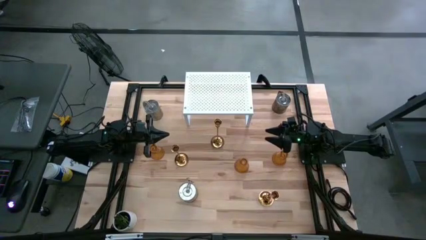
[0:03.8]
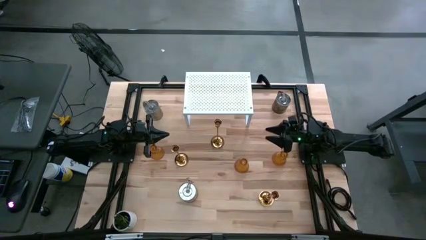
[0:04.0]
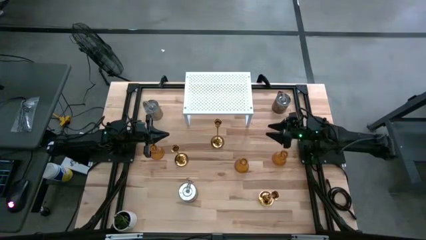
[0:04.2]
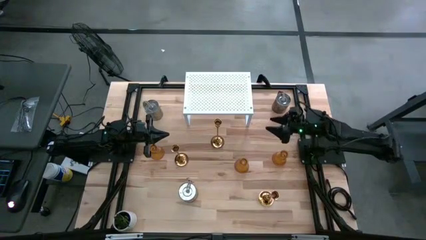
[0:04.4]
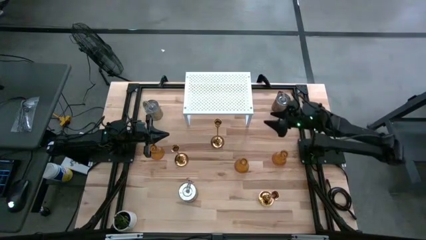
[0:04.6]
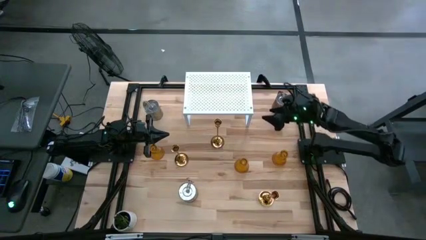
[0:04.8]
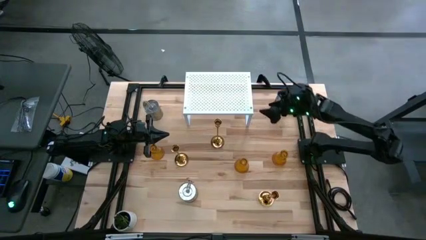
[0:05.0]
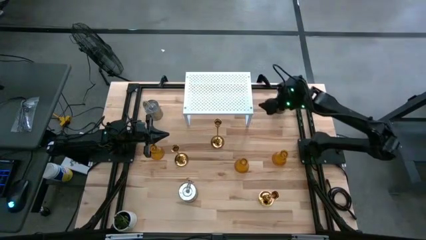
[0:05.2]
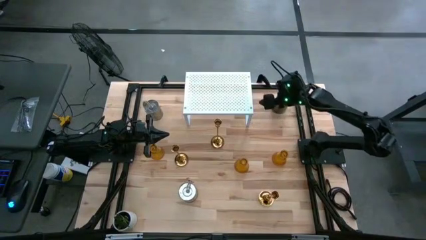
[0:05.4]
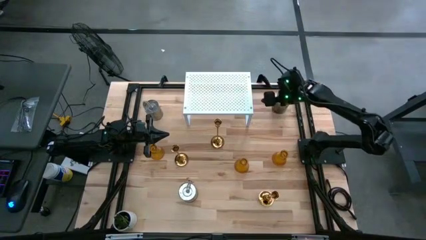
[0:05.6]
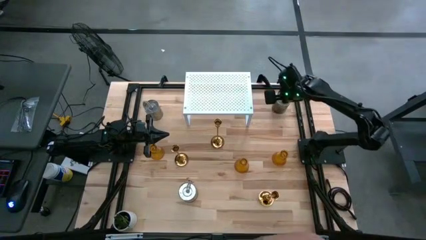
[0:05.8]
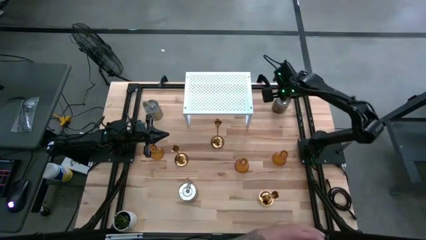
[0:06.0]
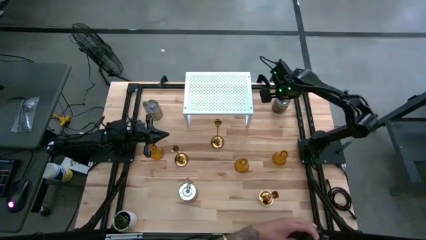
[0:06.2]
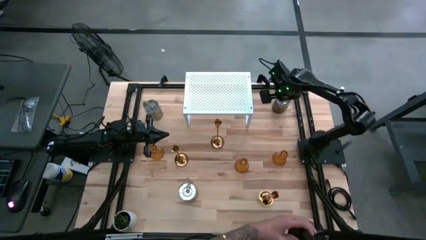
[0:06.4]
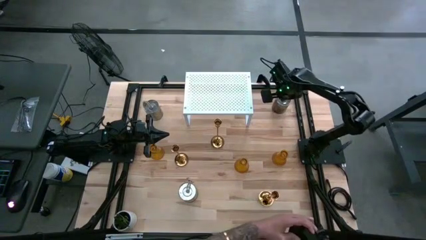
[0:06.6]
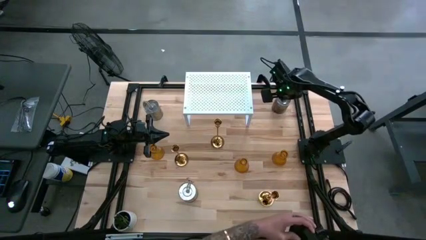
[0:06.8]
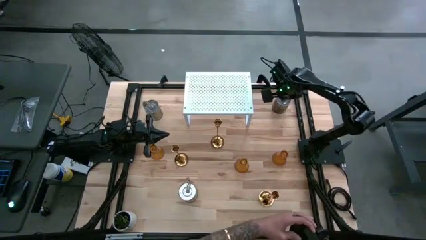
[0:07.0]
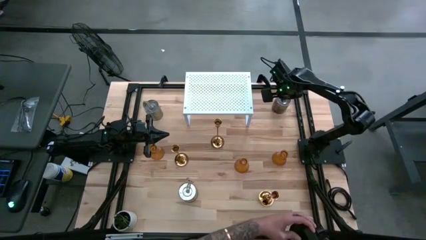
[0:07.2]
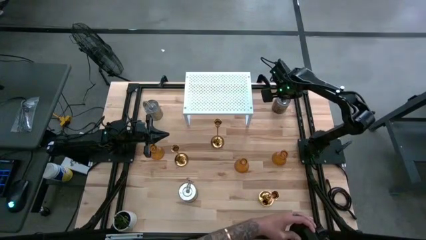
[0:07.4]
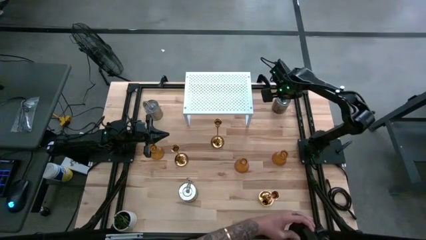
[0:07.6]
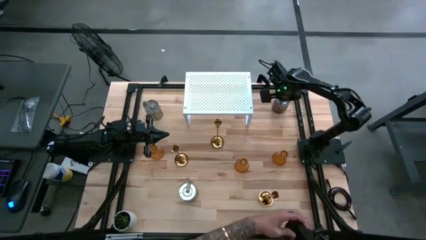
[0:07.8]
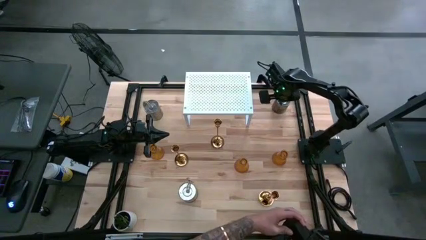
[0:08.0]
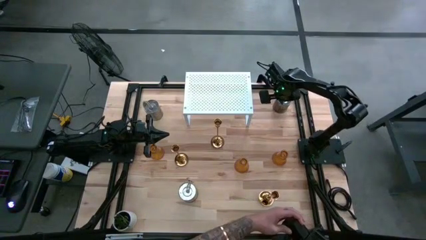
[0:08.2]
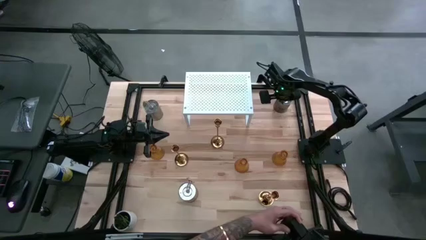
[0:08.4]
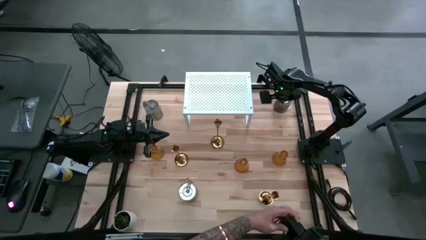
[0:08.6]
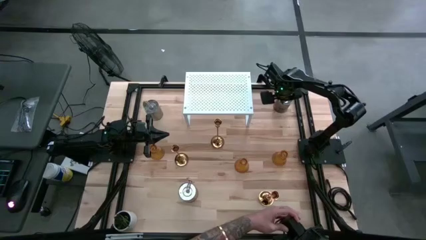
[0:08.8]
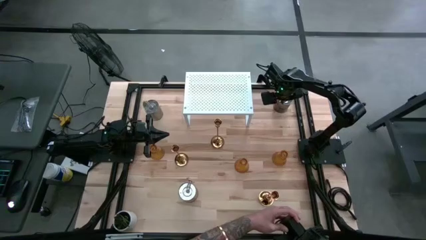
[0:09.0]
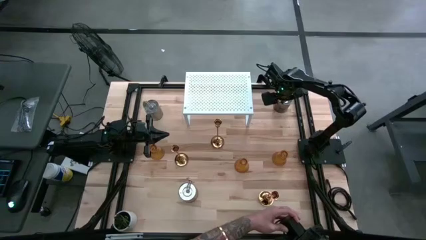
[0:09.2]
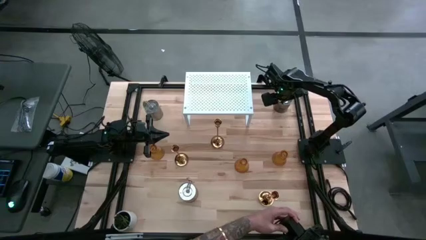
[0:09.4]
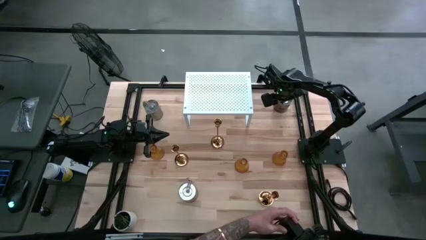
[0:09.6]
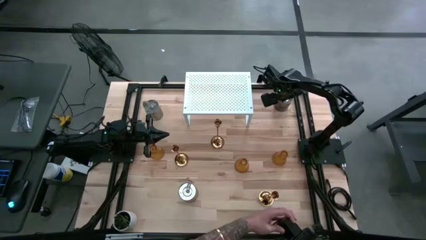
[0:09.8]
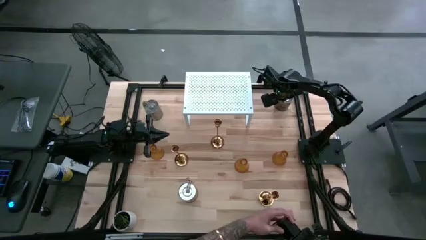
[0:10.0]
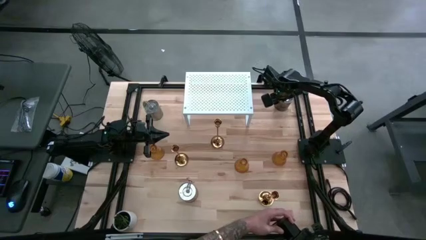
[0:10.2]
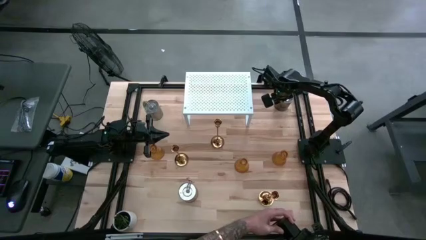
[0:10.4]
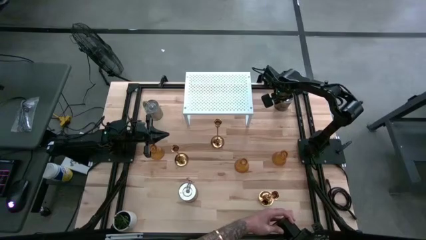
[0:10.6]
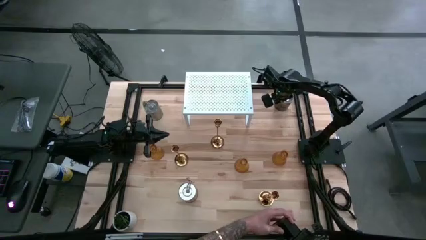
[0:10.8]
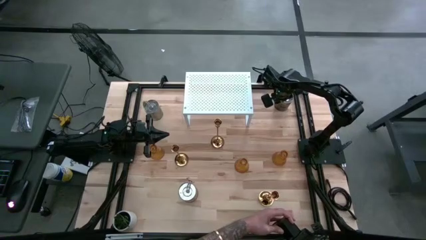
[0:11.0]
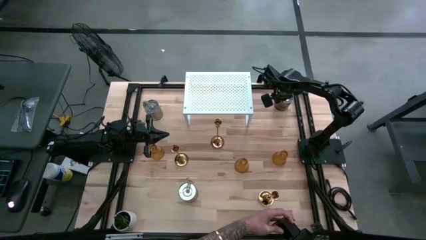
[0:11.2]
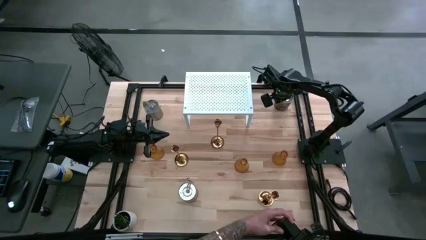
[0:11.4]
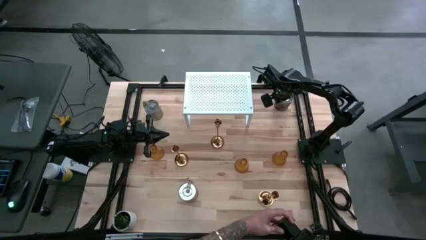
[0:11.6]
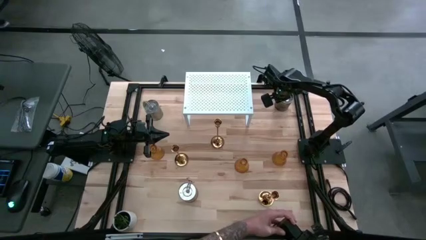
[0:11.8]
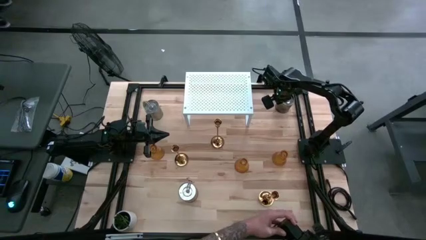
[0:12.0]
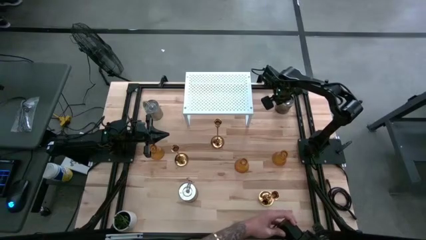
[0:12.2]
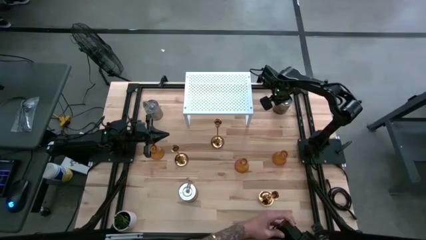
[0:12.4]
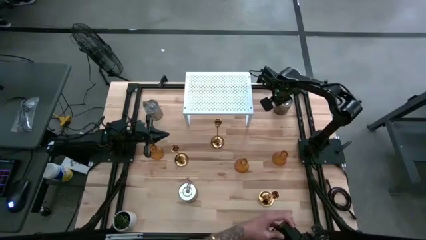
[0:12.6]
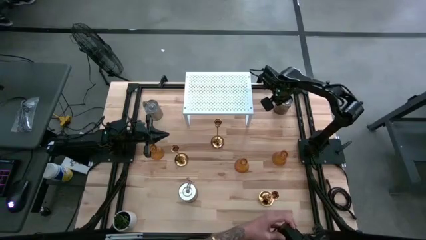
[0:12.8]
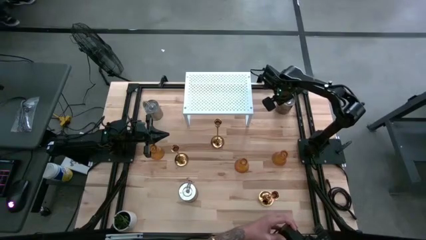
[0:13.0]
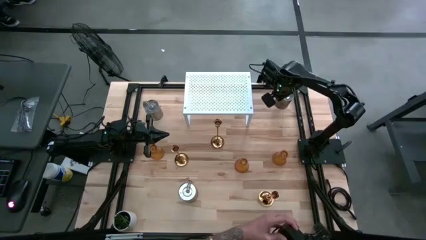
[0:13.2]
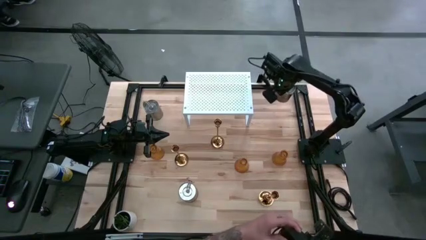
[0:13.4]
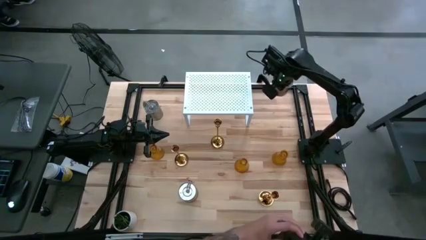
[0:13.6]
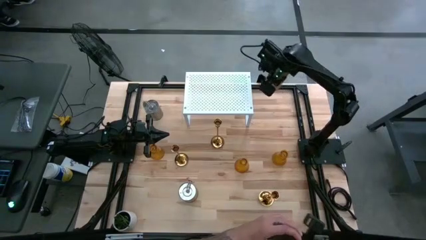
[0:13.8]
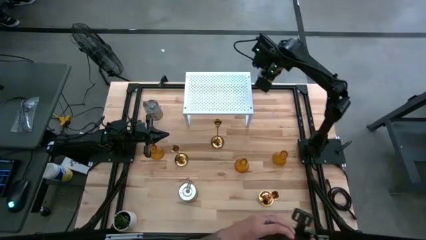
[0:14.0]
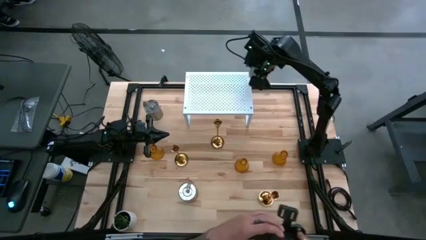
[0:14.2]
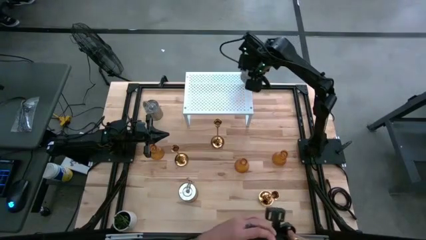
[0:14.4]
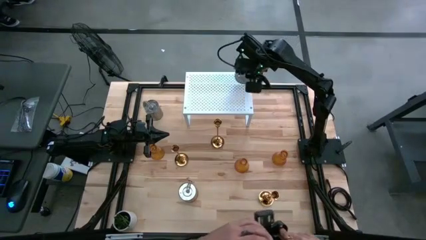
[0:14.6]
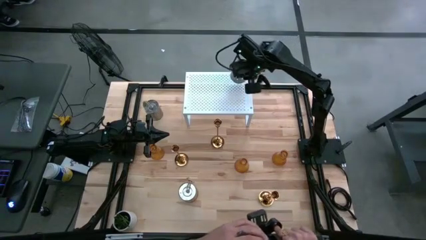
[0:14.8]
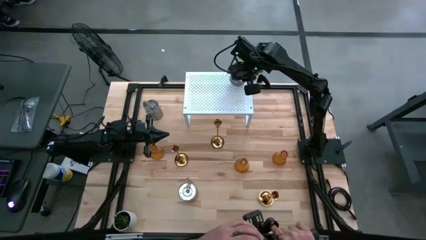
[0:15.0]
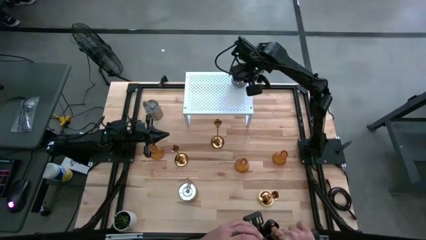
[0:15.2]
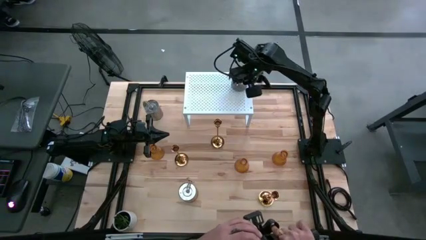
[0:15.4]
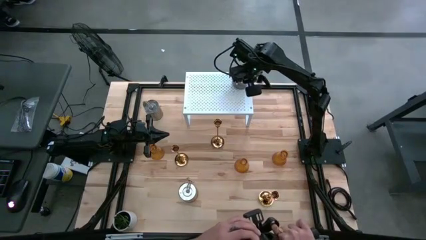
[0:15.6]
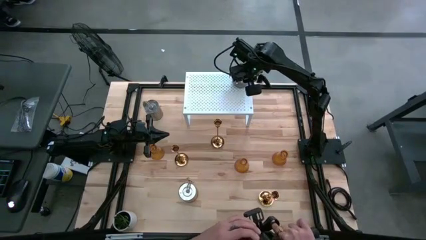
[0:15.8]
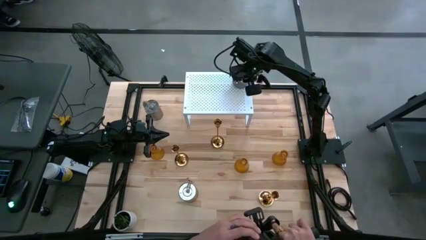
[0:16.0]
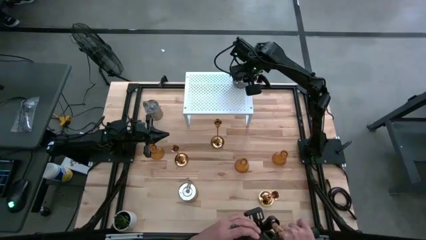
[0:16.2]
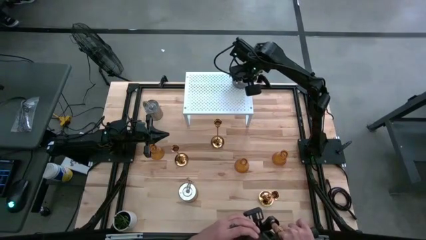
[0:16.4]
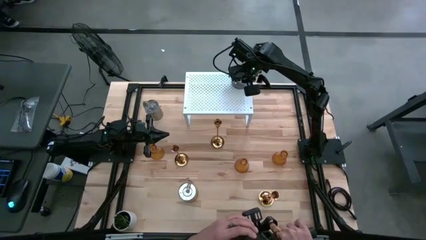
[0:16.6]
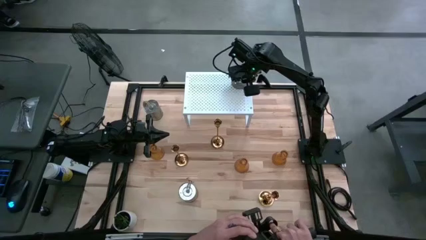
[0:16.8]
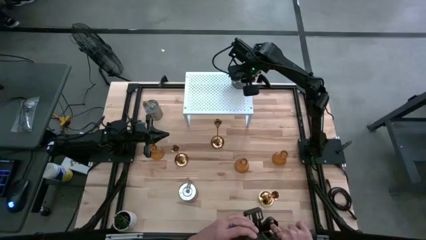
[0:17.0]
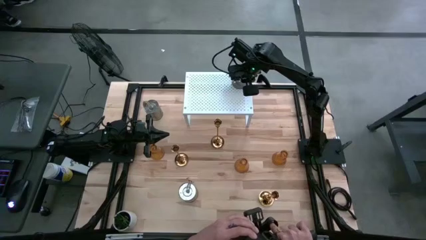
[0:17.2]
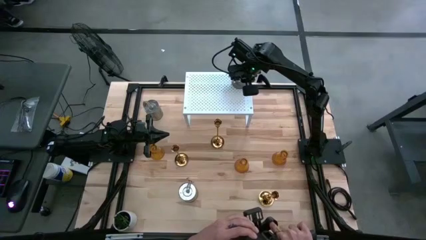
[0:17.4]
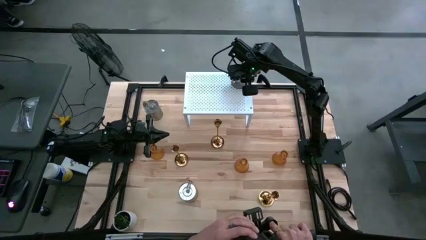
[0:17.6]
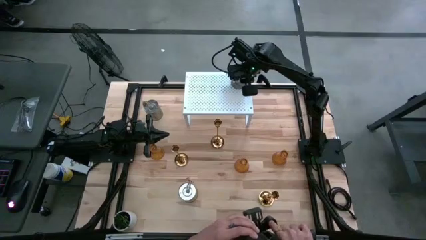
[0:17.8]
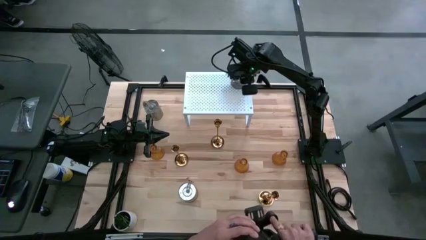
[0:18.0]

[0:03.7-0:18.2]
Task: Pick & Place candle stick holders
Put the top right silver scented candle on the shelf

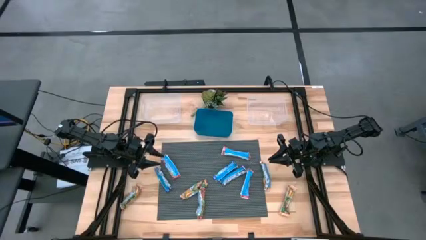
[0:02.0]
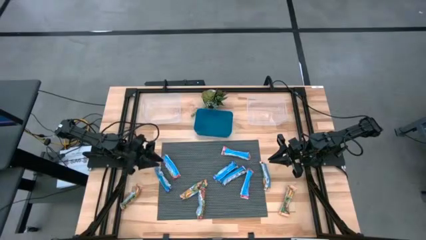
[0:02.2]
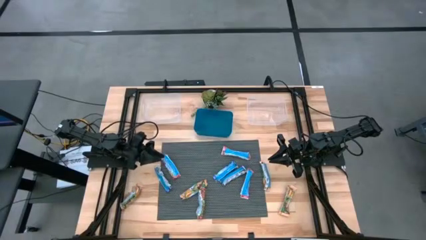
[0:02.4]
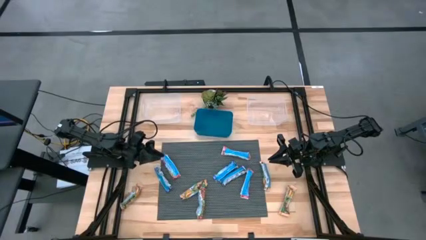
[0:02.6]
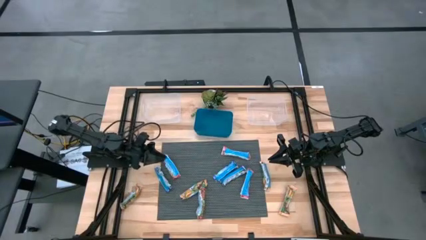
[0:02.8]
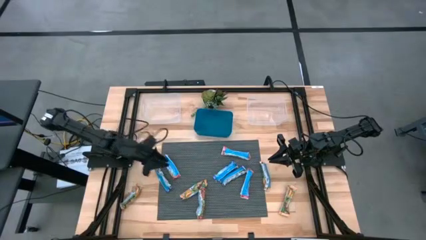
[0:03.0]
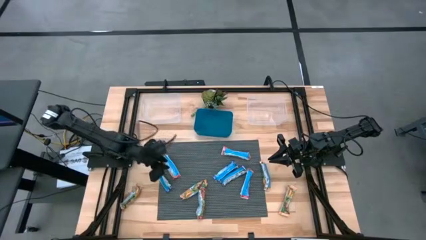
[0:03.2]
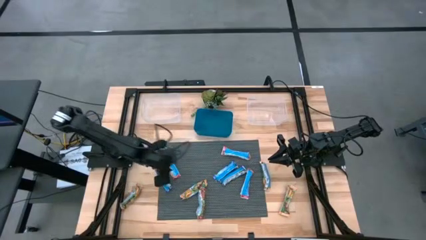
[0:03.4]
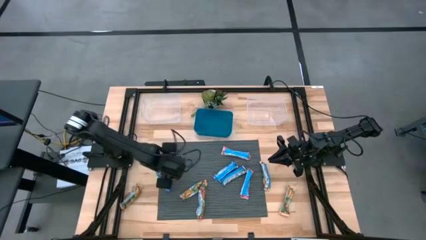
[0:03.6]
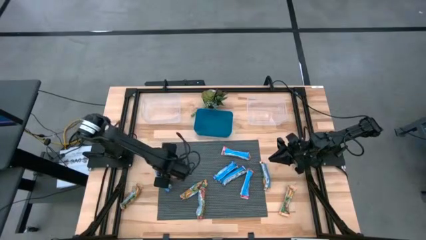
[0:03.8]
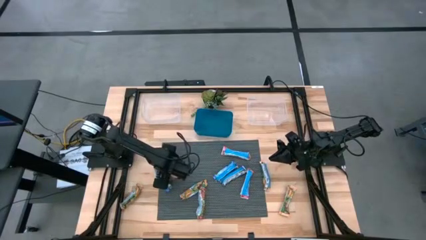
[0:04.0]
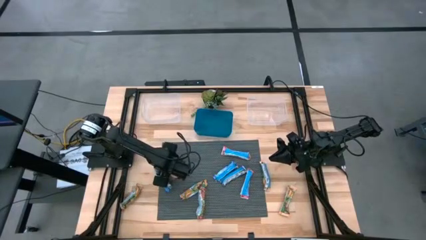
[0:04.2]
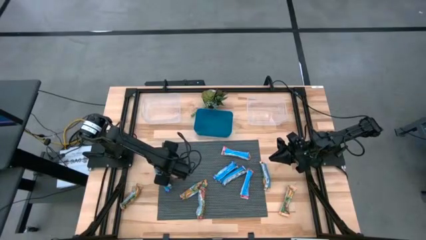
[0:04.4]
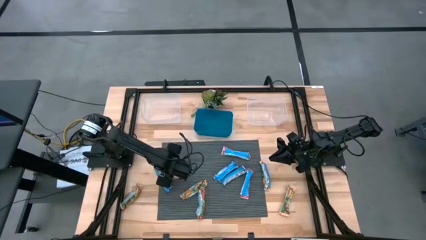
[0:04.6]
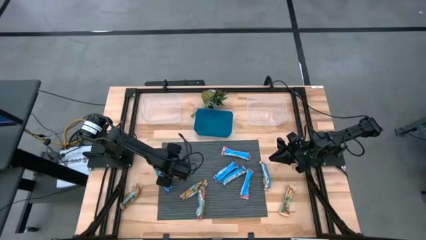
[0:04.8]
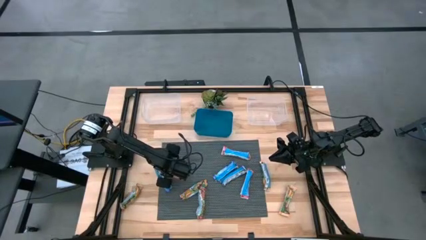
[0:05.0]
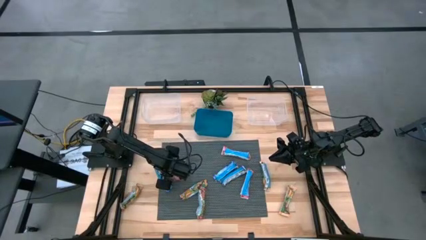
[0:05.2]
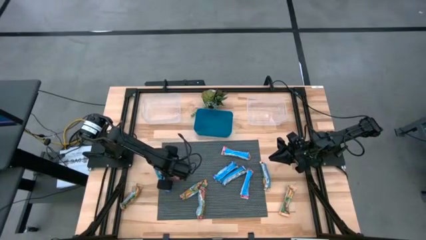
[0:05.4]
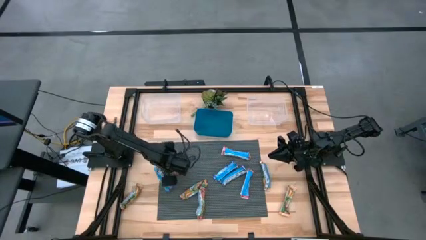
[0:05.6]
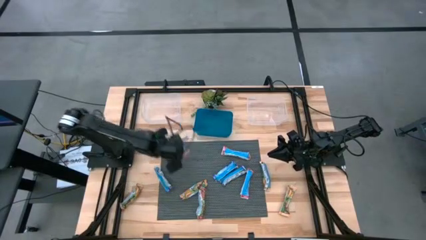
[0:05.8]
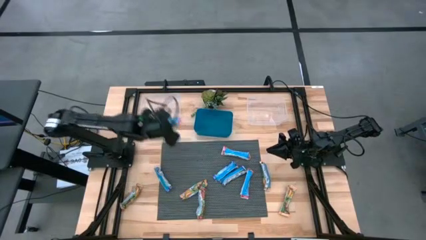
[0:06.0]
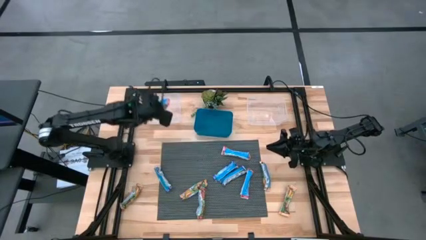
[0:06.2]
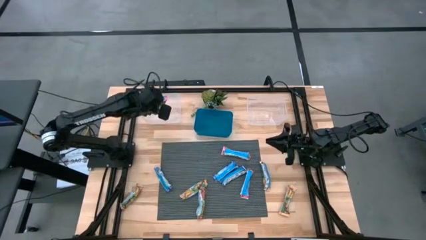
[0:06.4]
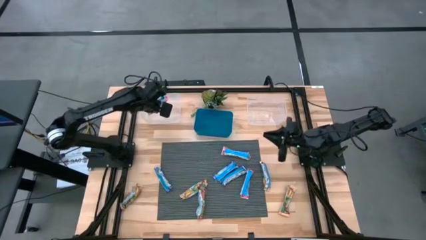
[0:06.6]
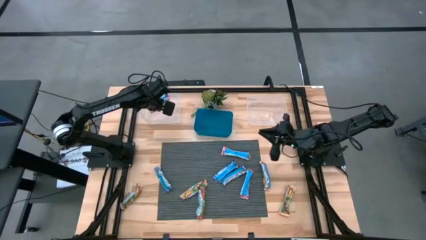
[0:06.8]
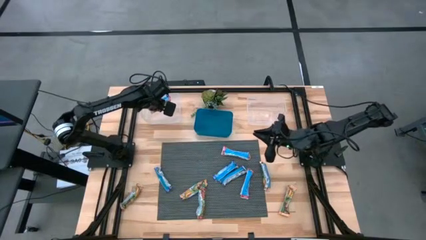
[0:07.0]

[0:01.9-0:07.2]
Task: Pick and place Granola Bars by type
Put the red granola bar into the left transparent bin
